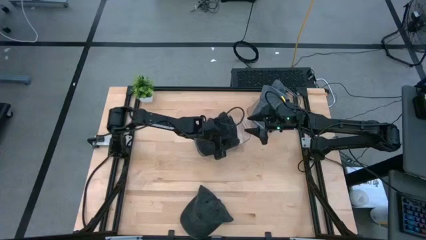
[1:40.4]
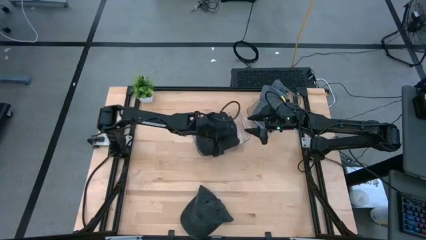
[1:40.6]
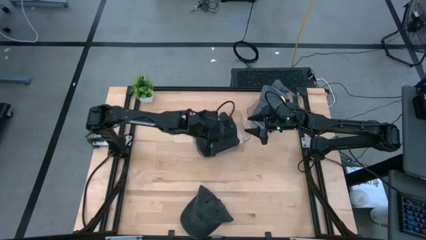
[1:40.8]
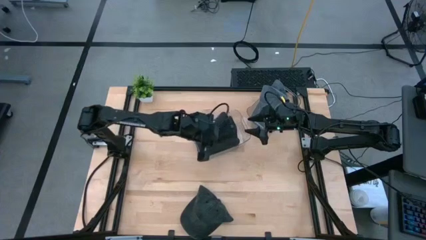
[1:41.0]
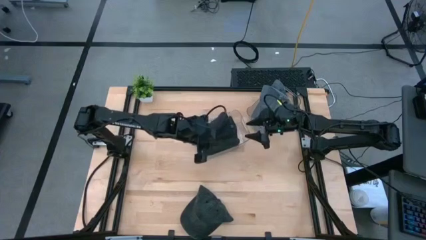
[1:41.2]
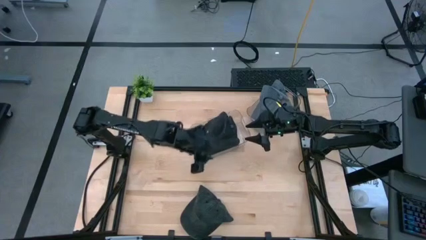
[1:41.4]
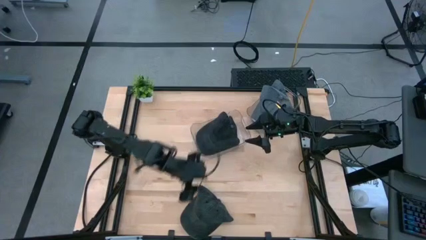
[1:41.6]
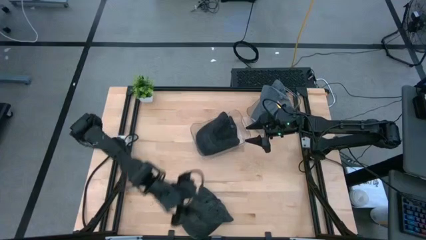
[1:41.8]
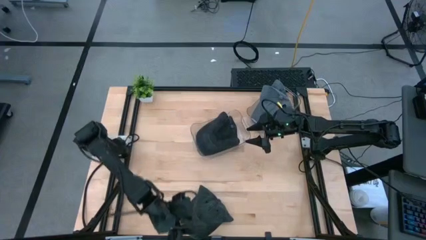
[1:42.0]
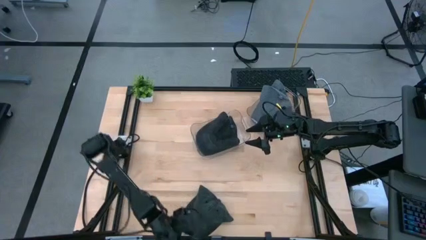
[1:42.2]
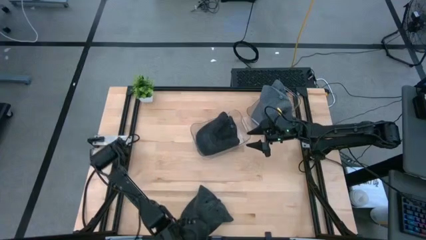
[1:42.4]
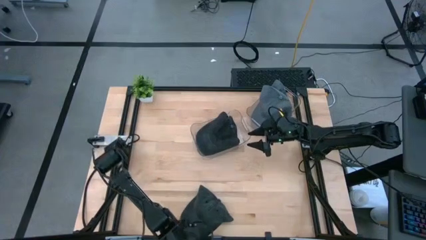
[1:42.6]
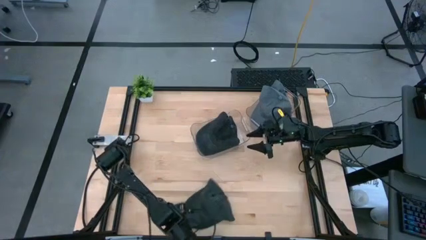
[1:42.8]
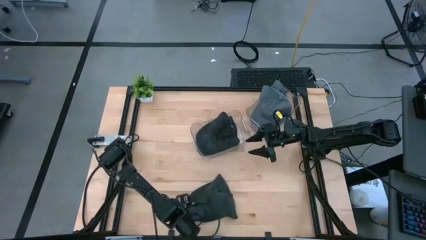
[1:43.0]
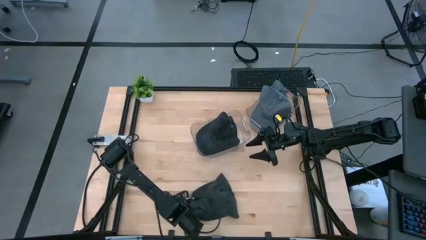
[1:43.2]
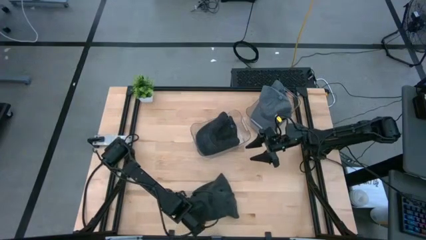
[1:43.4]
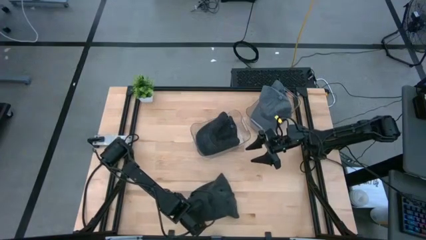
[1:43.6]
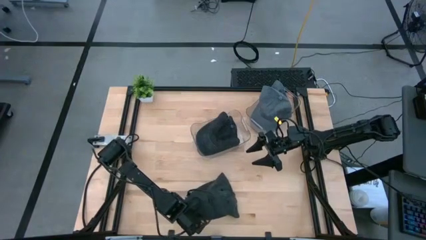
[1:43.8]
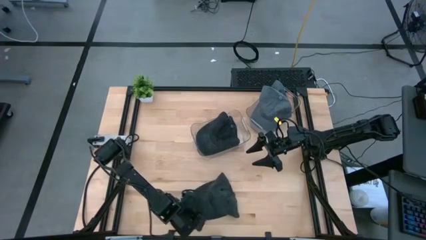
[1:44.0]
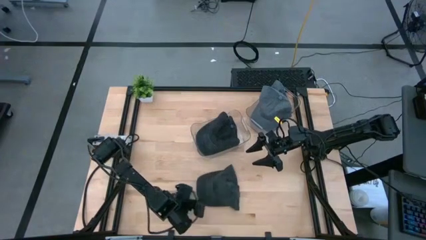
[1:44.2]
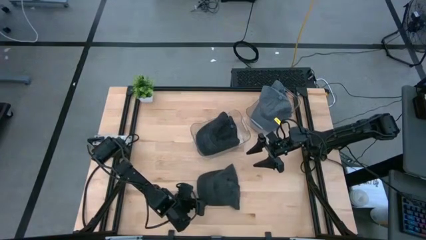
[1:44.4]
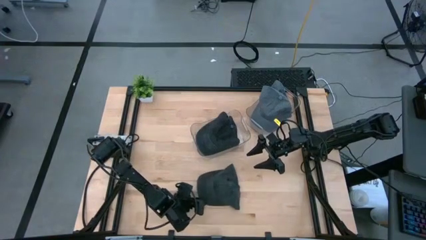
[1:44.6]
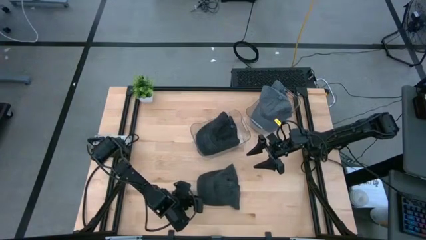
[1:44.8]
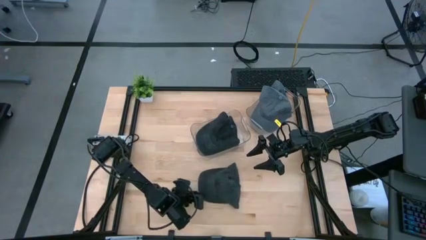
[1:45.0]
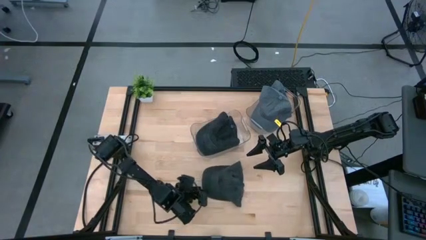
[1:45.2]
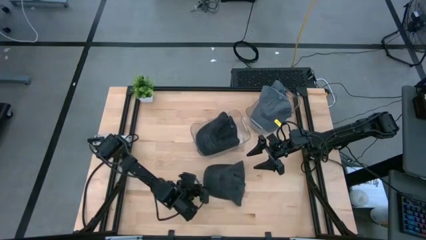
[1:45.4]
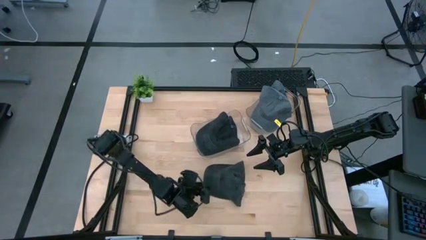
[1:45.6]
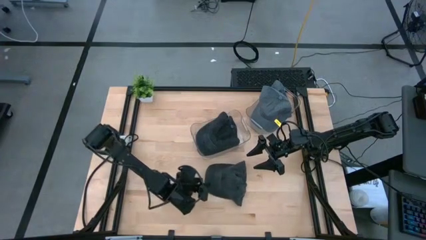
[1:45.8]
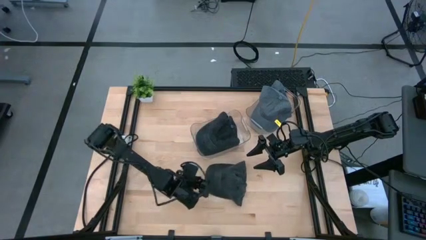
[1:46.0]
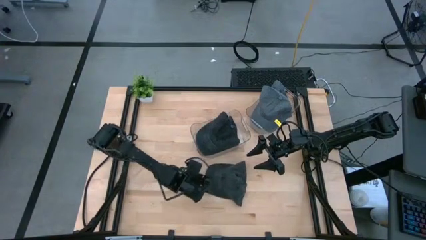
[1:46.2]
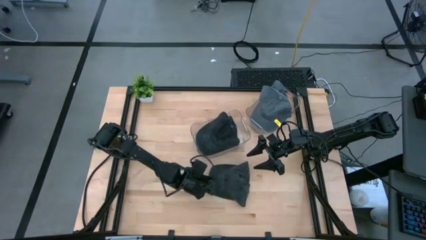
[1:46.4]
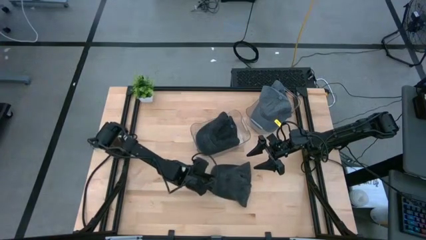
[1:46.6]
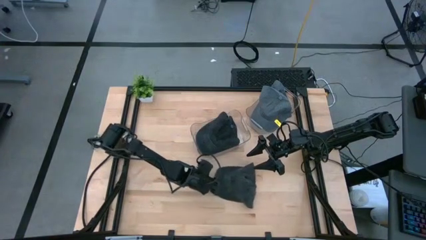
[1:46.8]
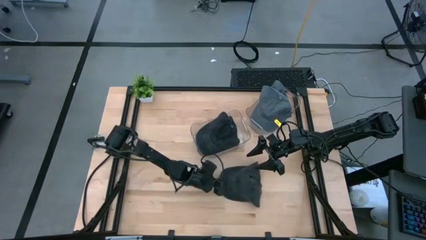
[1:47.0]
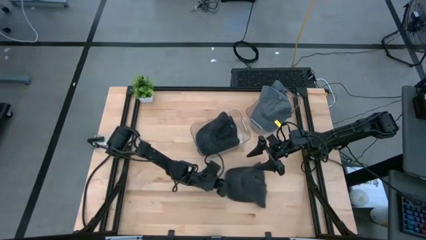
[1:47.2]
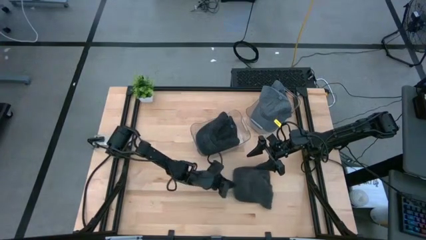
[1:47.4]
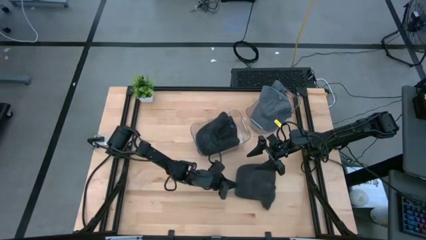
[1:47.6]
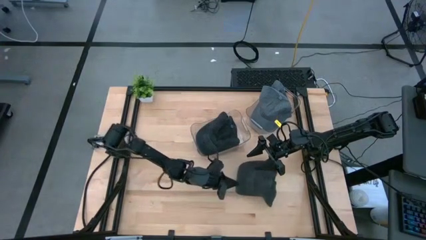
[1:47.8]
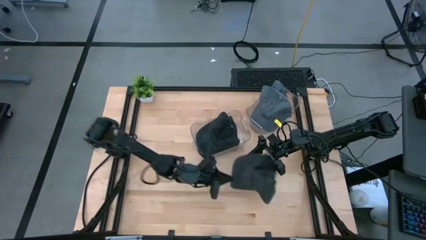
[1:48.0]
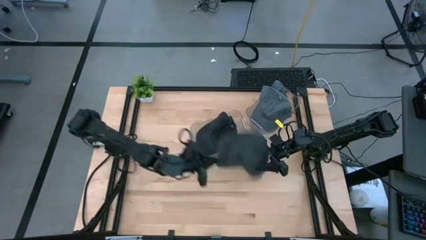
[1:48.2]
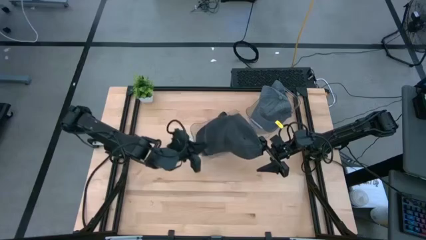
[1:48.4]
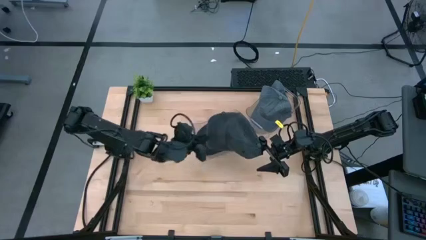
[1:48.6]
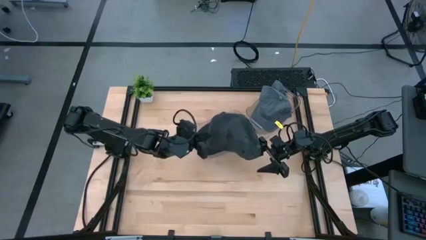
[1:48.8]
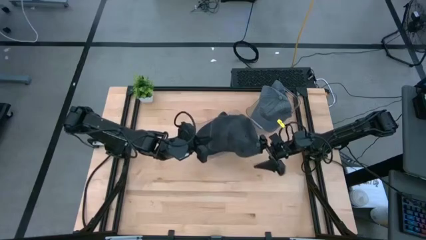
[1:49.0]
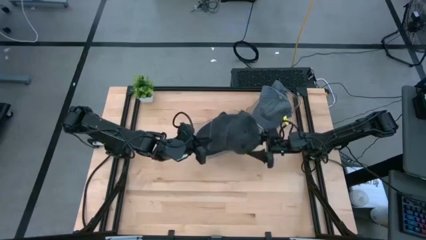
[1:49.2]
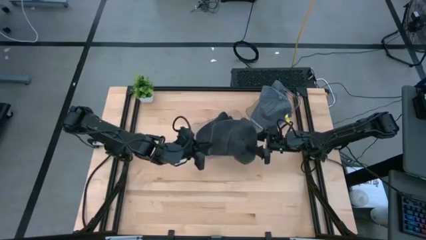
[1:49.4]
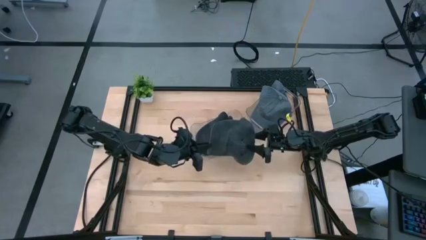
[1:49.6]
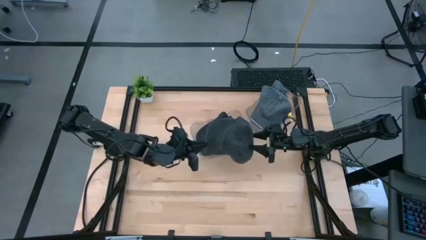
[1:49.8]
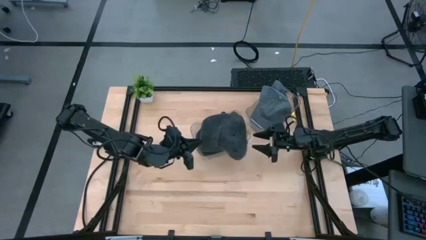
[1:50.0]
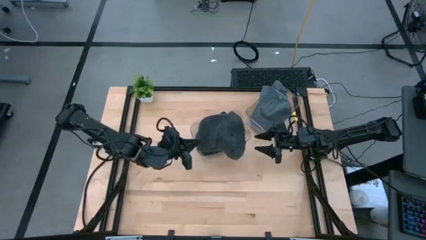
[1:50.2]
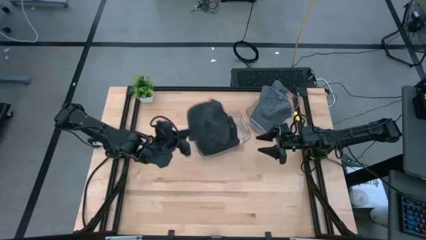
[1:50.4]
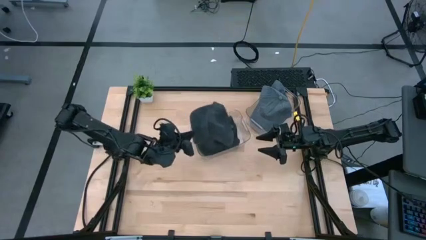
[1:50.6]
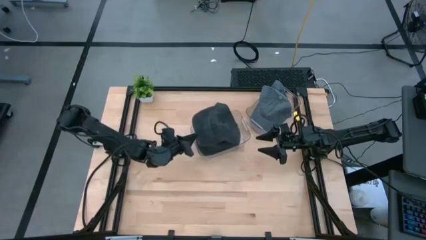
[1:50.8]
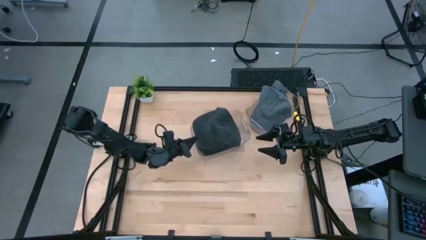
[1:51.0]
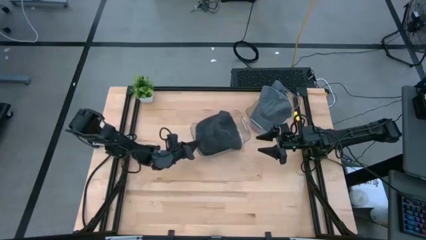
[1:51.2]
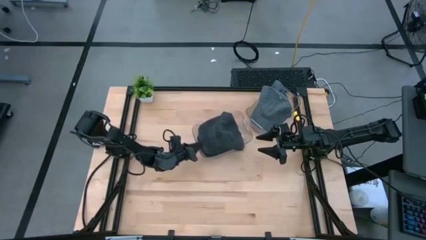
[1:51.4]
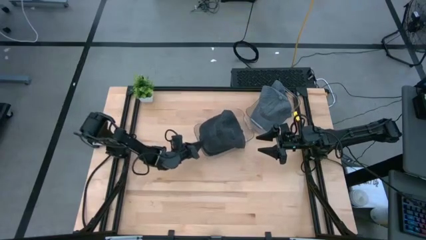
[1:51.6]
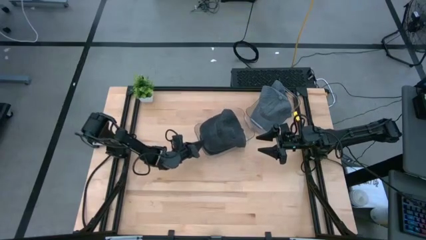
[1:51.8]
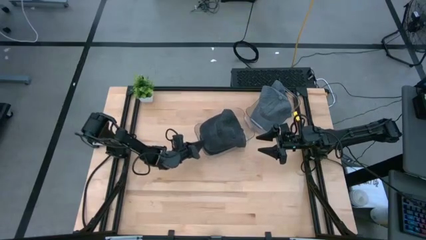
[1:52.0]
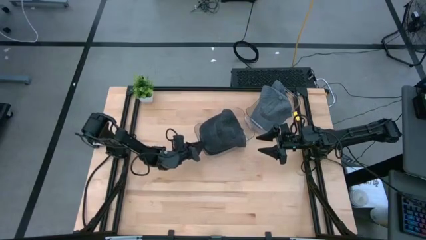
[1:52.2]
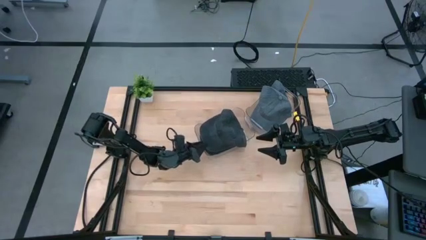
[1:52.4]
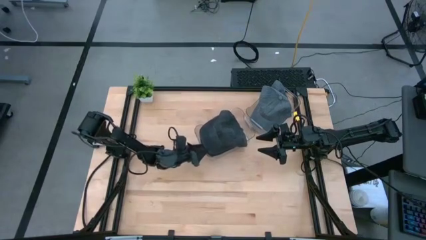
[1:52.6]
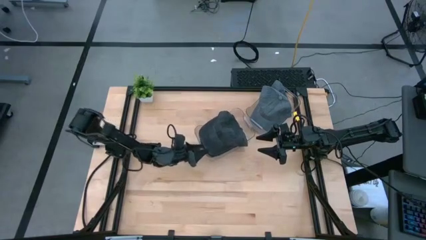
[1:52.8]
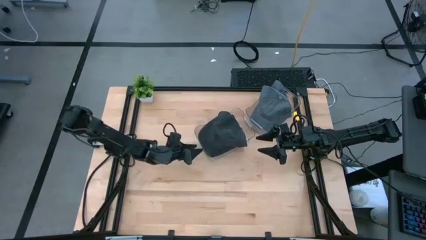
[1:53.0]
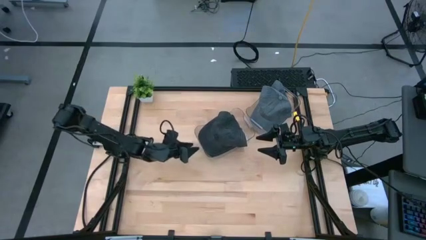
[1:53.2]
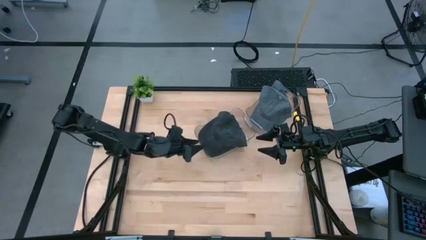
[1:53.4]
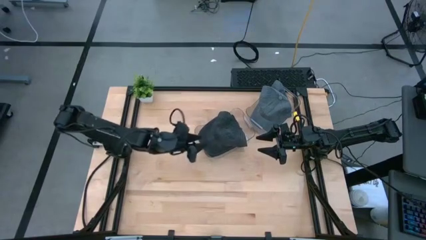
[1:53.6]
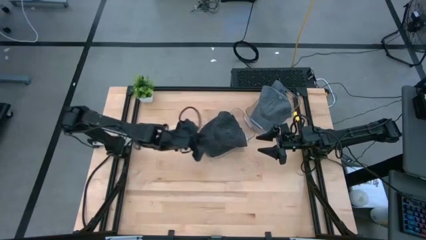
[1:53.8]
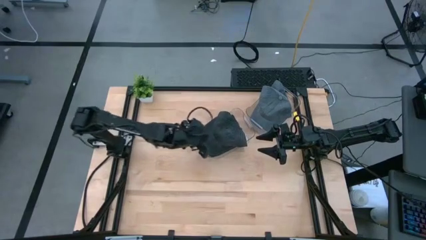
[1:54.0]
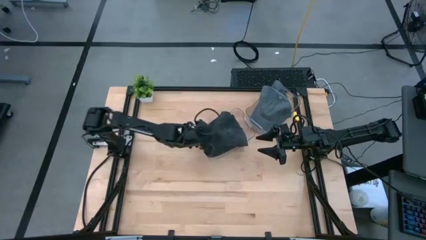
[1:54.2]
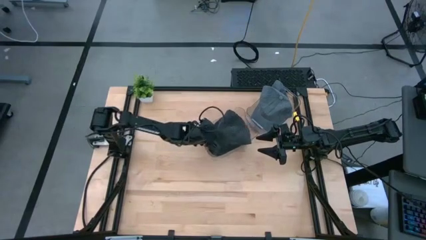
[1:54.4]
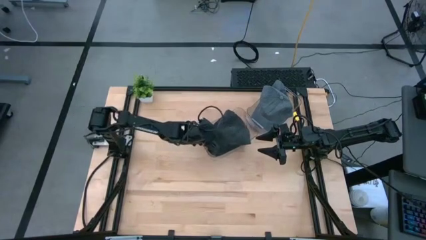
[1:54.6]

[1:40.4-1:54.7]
Task: Pick & Place hat
Stack the black cap on top of the black cap in the left transparent bin

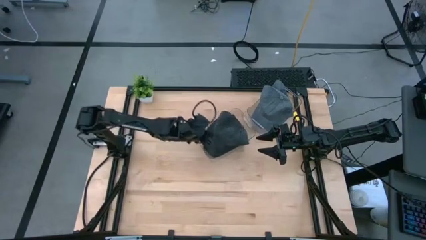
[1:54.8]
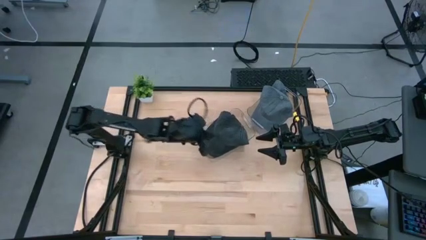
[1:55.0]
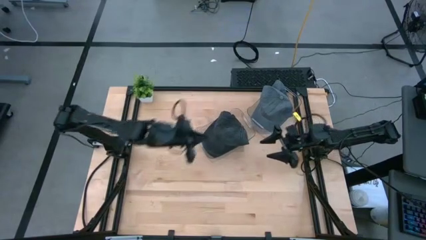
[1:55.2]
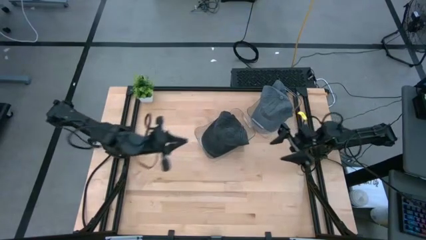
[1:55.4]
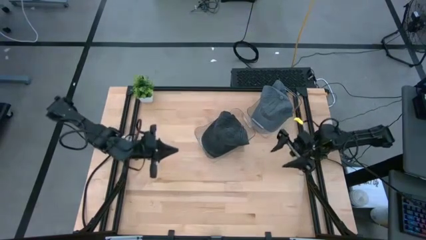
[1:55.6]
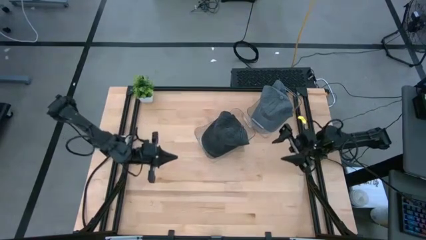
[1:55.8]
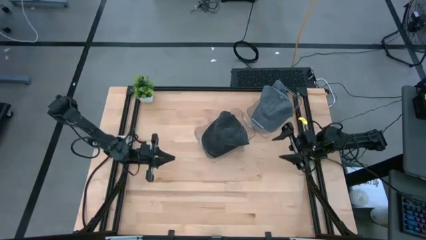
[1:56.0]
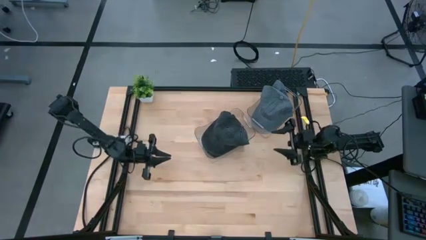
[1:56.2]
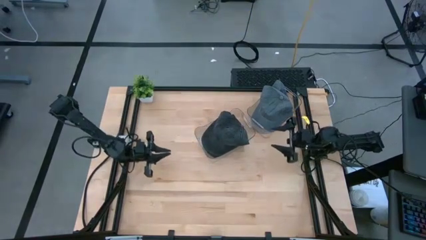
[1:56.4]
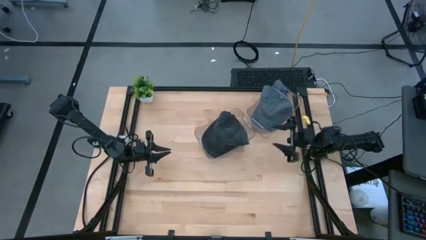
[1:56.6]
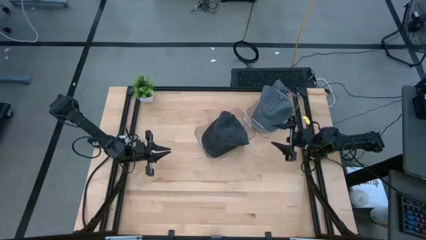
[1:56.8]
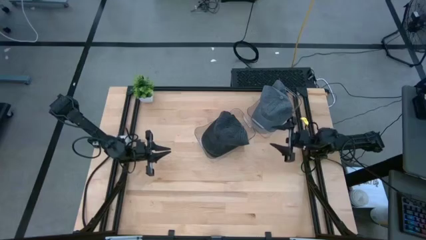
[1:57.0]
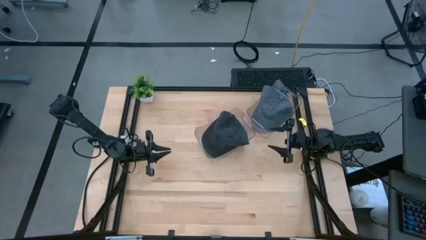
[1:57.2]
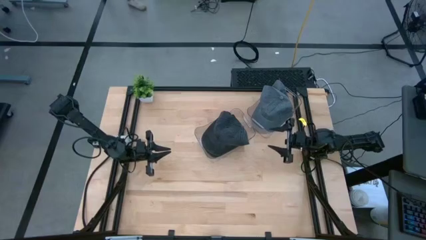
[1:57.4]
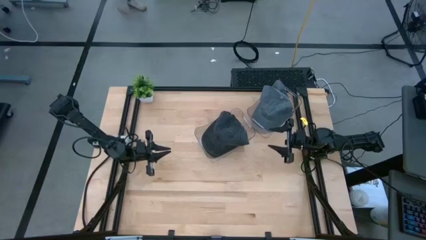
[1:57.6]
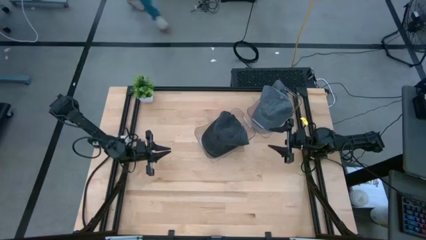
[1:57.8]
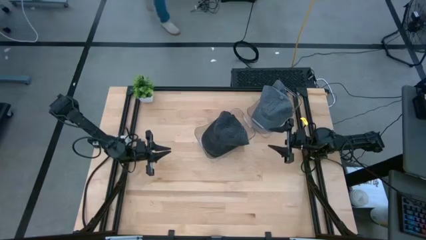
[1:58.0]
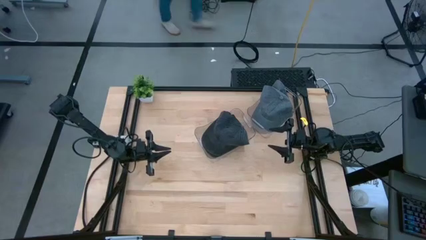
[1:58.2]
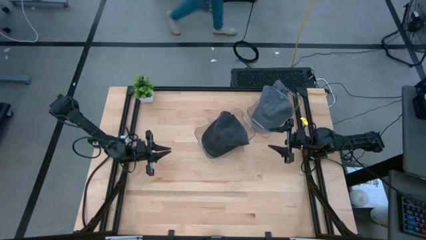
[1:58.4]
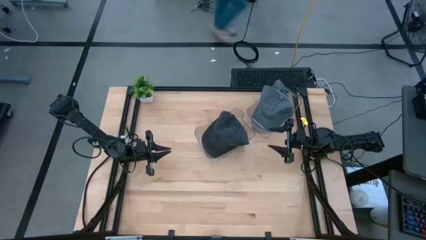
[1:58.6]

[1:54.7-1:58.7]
Return to Home Position
